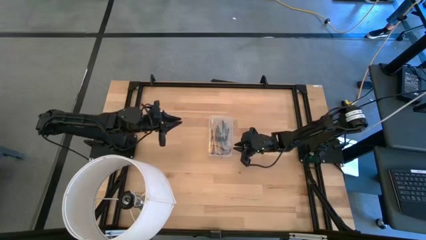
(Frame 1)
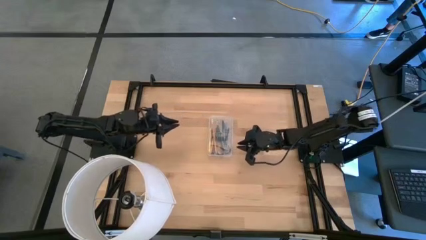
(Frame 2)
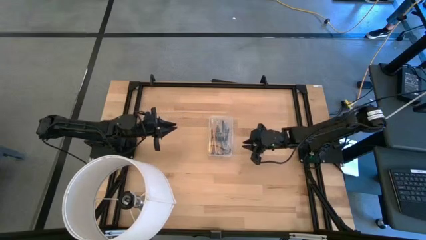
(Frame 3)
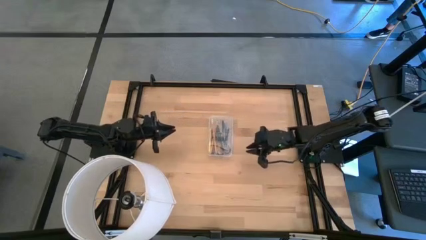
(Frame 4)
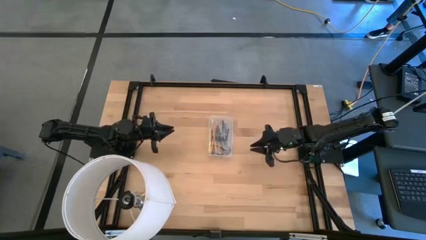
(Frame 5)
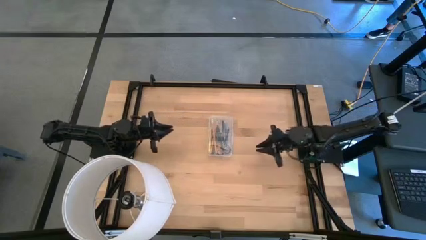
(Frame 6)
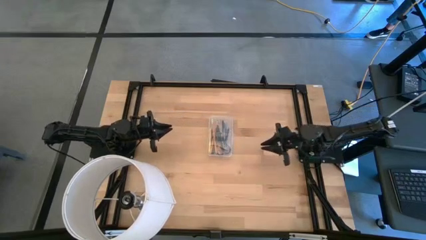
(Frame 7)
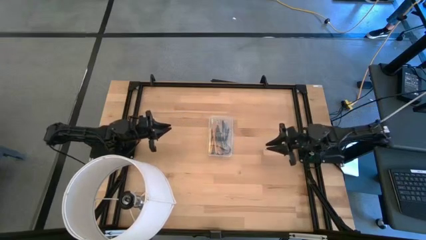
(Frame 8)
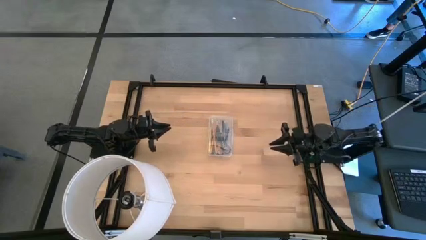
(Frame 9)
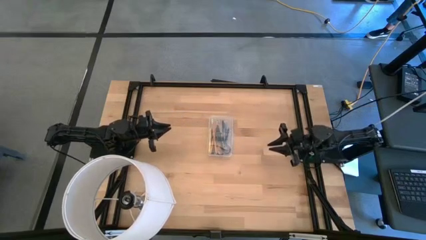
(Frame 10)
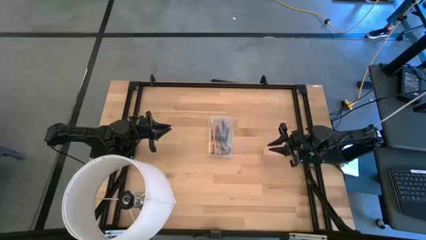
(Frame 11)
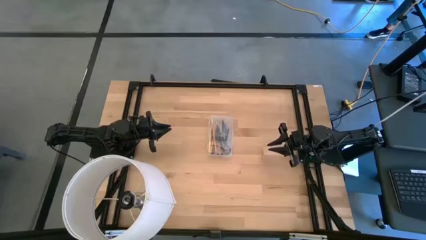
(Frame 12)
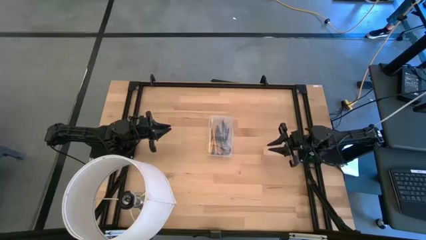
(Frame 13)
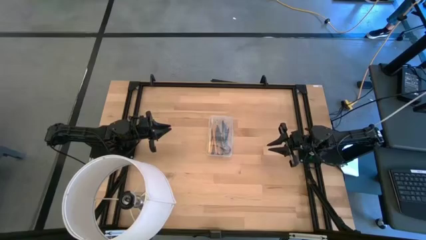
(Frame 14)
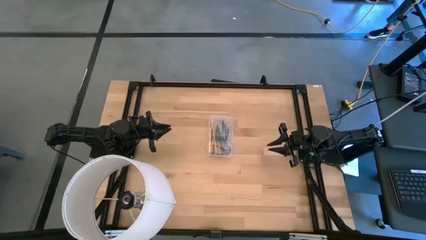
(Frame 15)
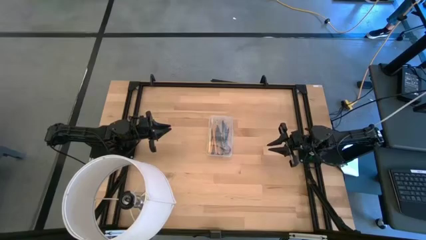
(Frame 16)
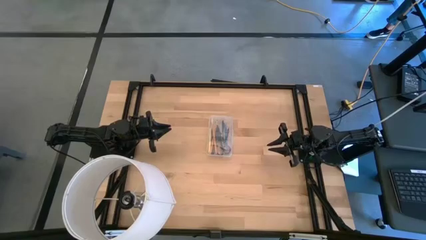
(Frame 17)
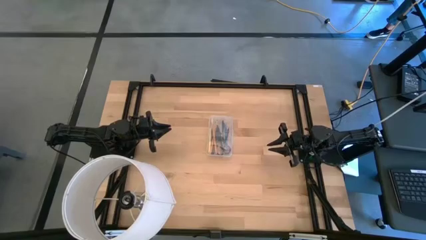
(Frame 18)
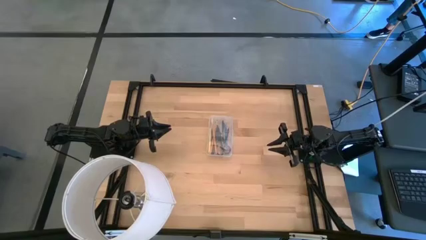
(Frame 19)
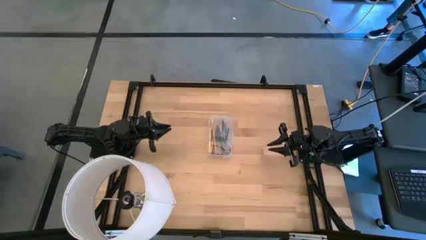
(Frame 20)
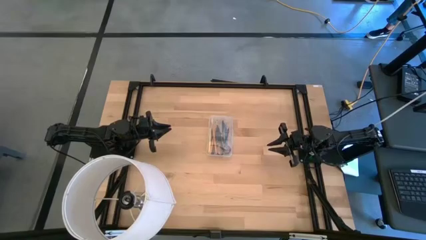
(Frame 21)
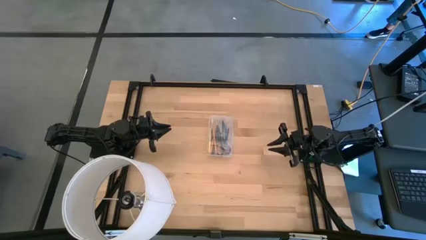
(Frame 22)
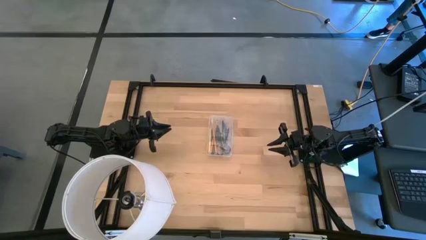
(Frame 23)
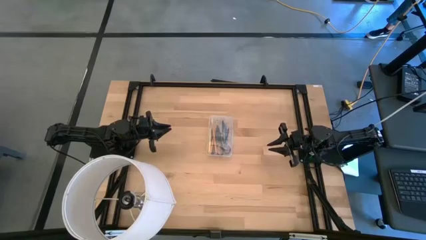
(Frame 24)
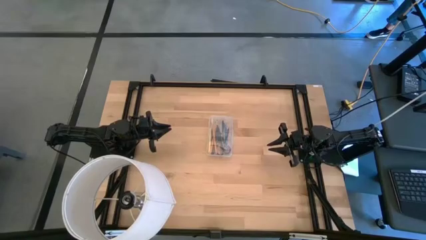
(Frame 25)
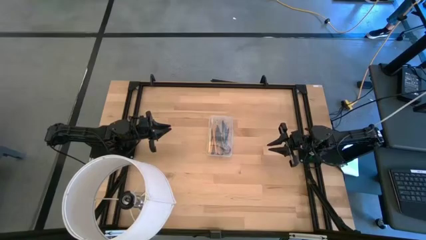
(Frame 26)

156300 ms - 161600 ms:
Task: Pick & place school supplies into a supply box
Return to Home Position

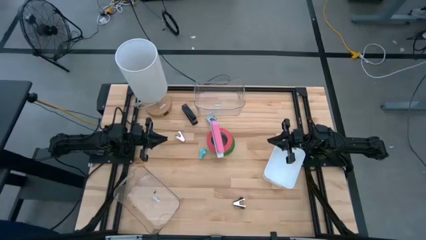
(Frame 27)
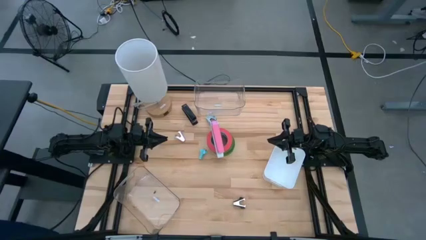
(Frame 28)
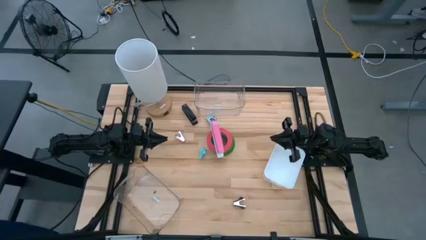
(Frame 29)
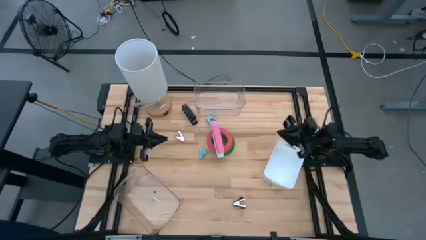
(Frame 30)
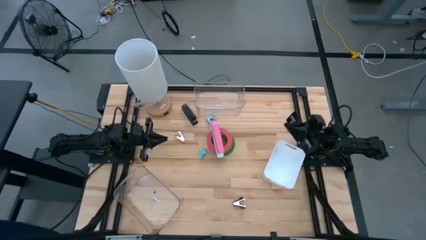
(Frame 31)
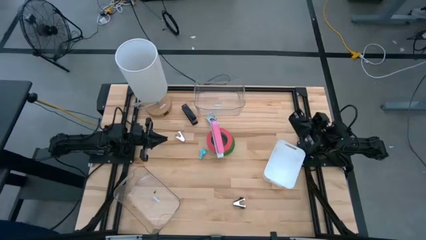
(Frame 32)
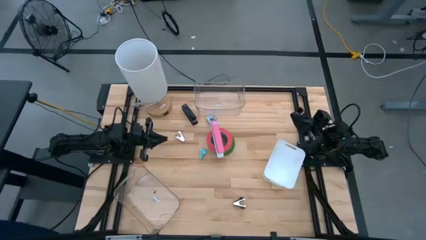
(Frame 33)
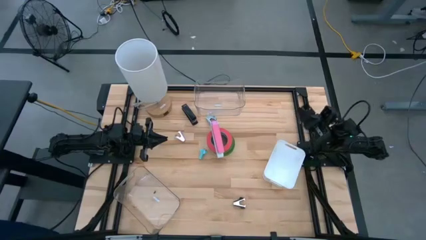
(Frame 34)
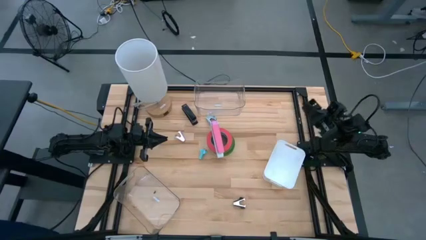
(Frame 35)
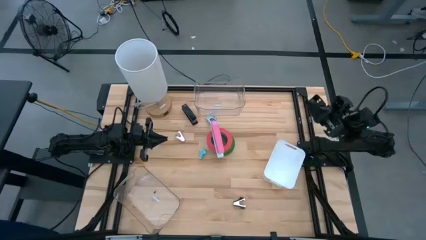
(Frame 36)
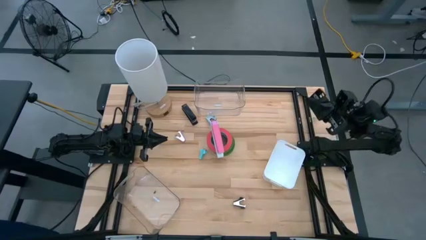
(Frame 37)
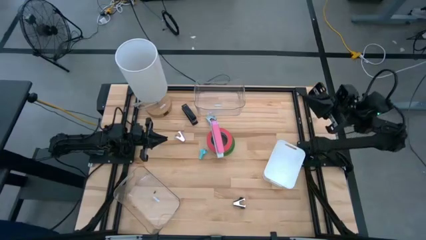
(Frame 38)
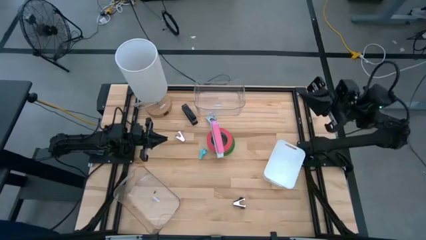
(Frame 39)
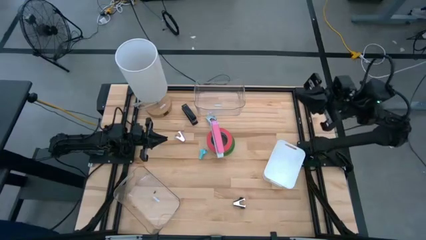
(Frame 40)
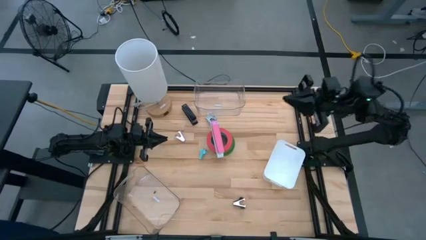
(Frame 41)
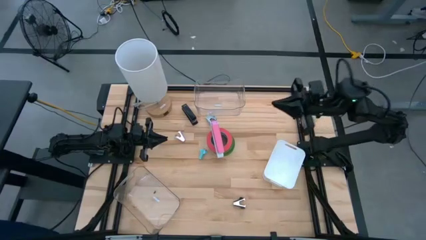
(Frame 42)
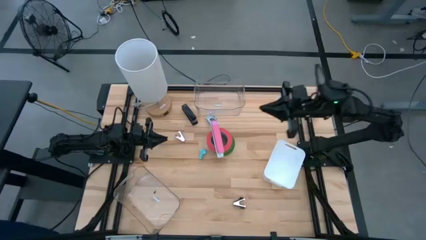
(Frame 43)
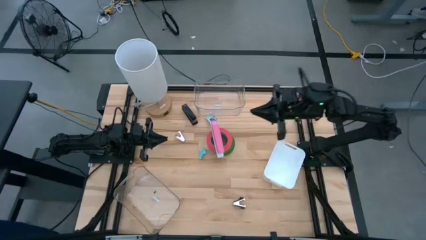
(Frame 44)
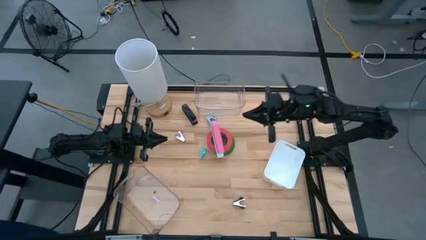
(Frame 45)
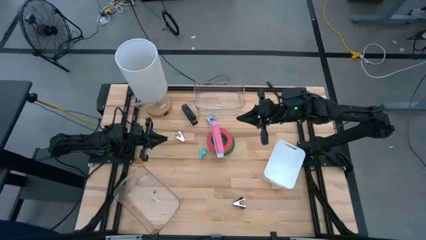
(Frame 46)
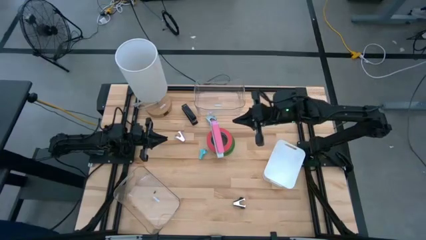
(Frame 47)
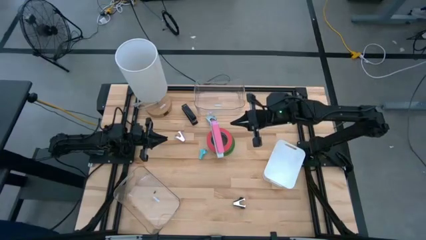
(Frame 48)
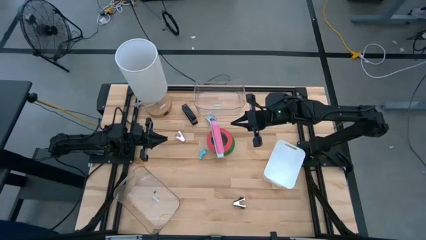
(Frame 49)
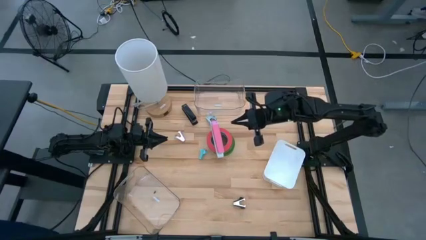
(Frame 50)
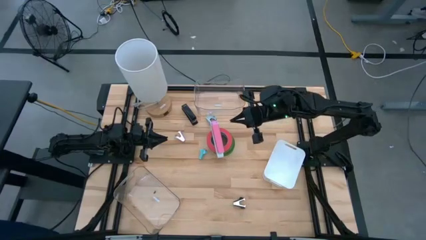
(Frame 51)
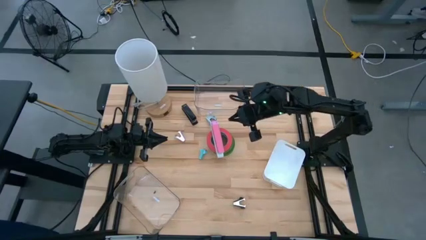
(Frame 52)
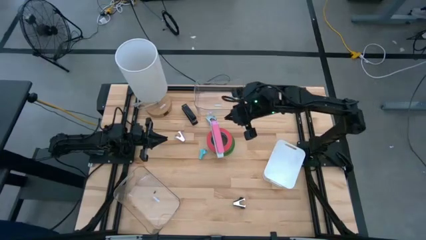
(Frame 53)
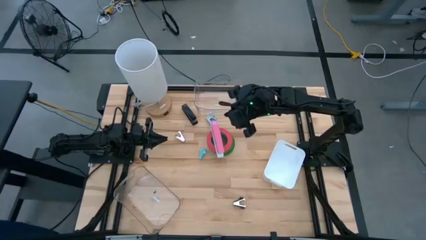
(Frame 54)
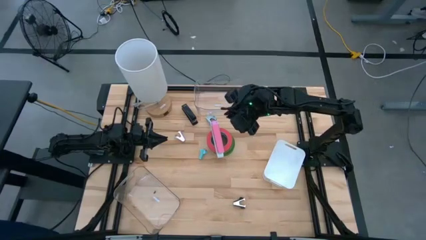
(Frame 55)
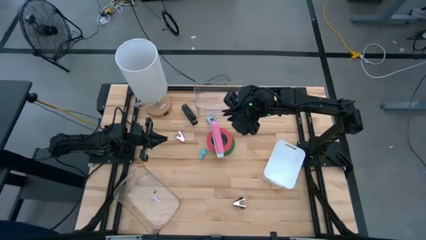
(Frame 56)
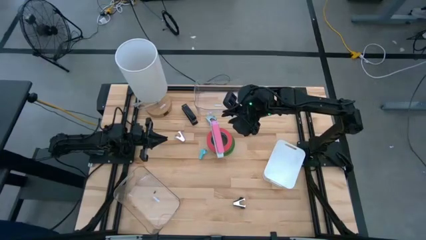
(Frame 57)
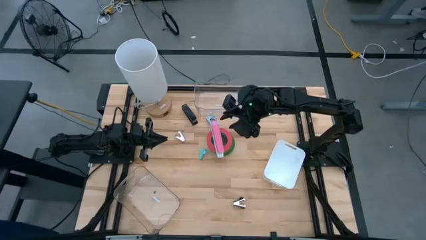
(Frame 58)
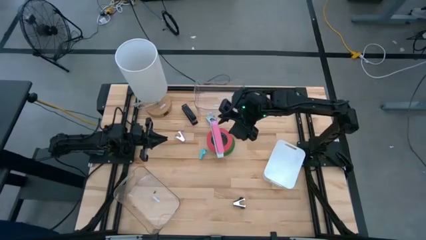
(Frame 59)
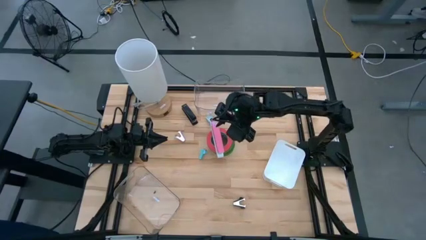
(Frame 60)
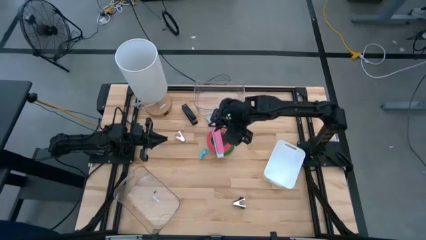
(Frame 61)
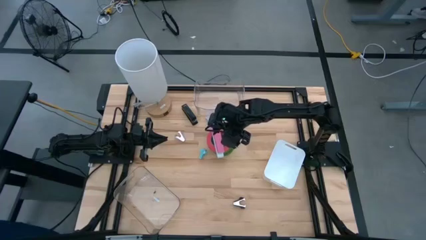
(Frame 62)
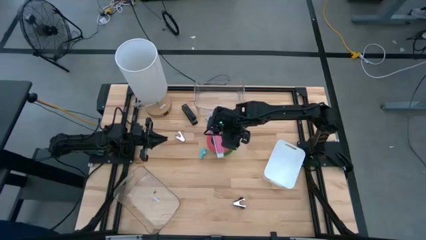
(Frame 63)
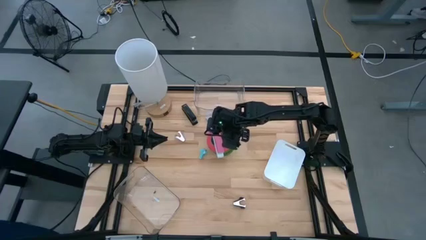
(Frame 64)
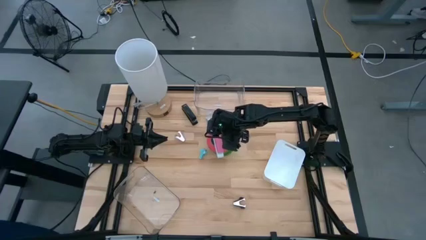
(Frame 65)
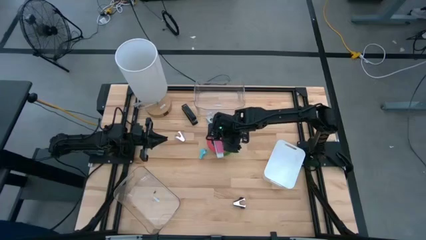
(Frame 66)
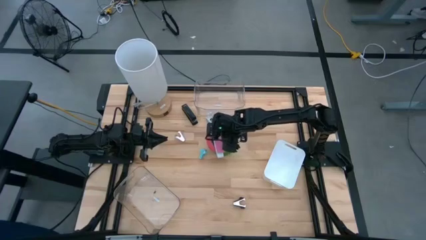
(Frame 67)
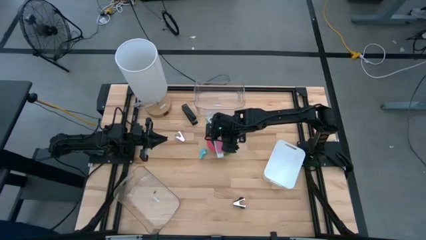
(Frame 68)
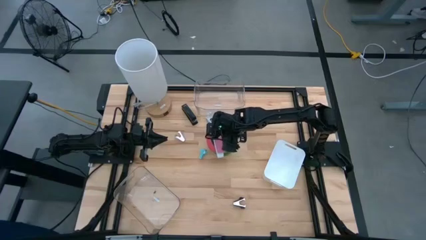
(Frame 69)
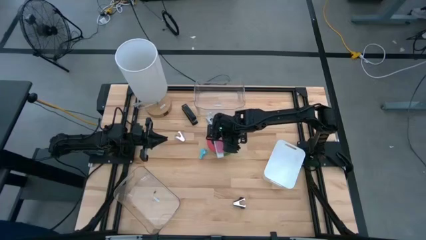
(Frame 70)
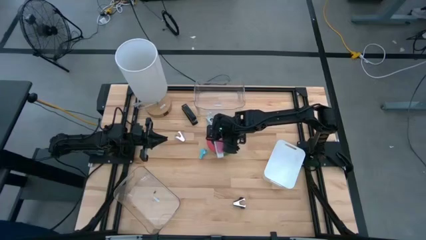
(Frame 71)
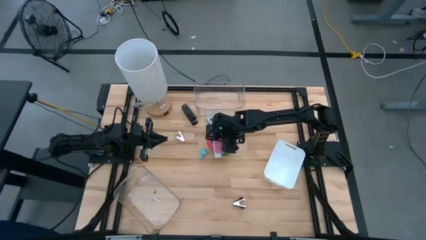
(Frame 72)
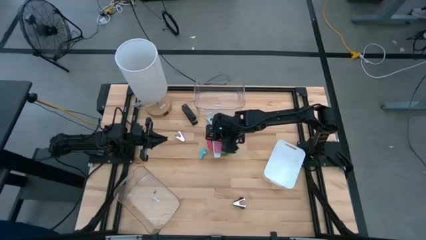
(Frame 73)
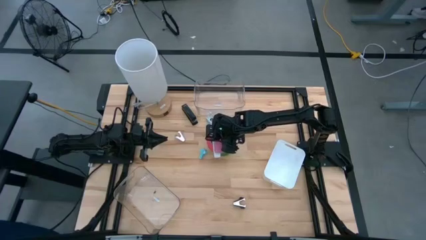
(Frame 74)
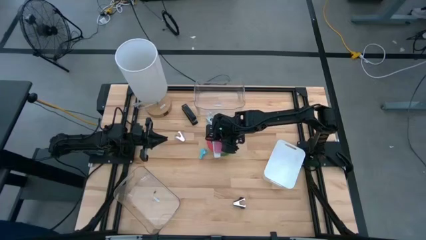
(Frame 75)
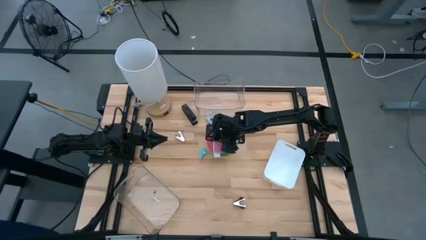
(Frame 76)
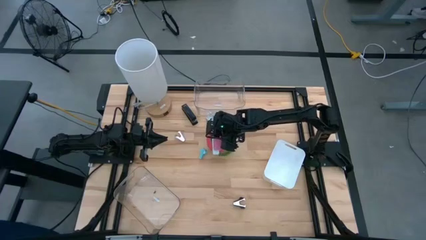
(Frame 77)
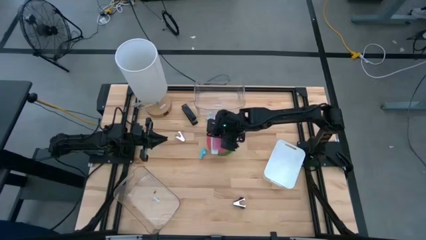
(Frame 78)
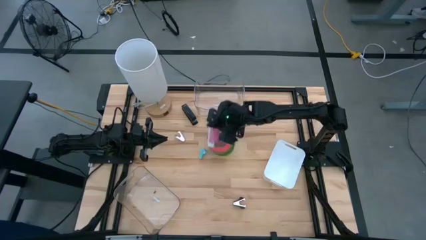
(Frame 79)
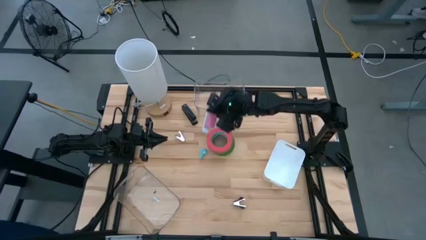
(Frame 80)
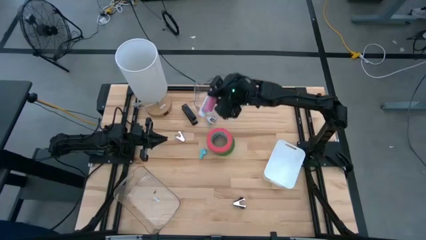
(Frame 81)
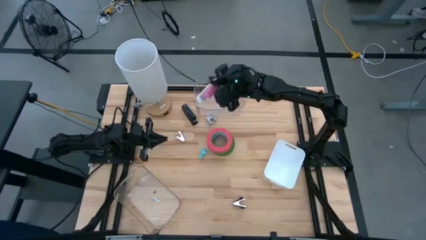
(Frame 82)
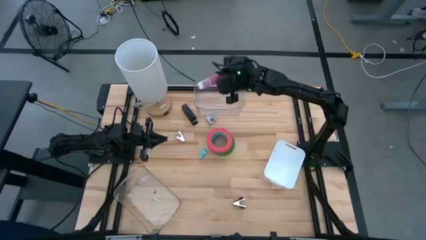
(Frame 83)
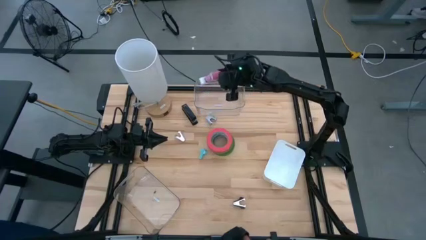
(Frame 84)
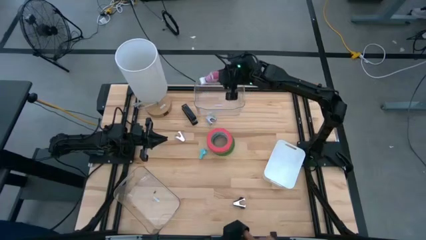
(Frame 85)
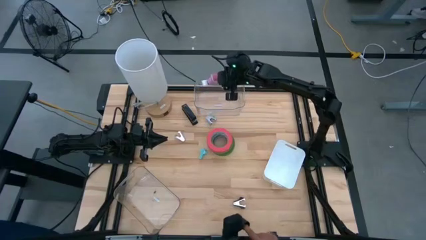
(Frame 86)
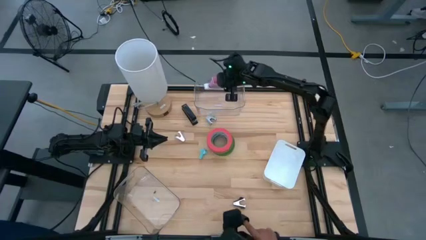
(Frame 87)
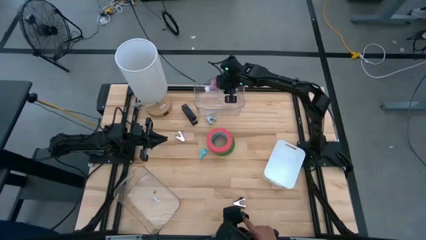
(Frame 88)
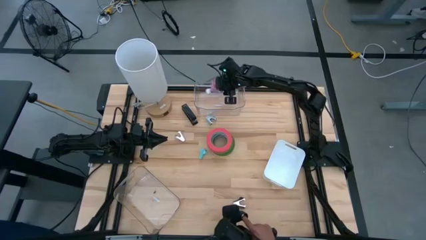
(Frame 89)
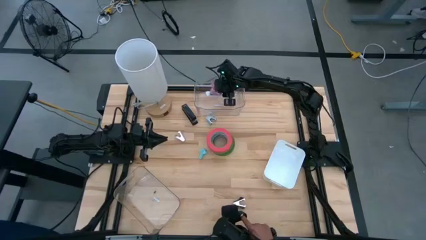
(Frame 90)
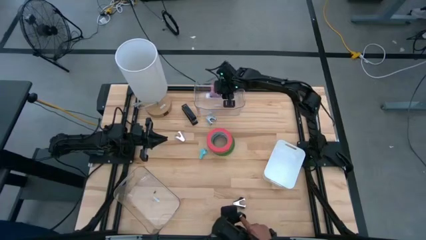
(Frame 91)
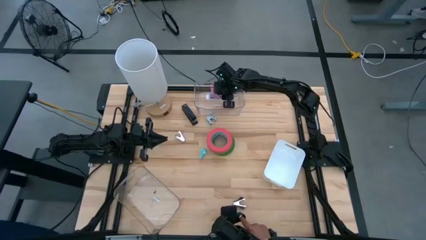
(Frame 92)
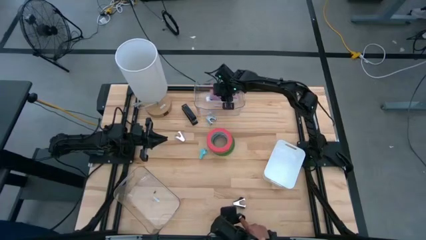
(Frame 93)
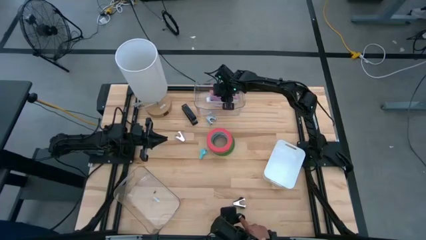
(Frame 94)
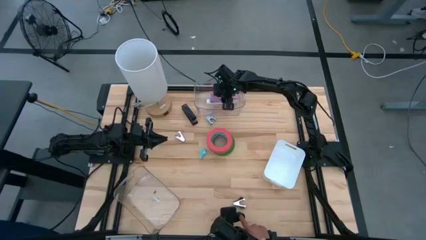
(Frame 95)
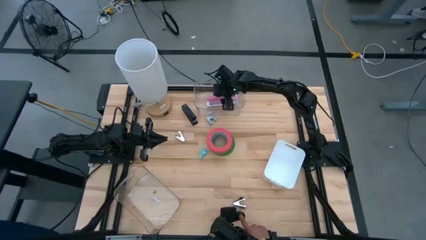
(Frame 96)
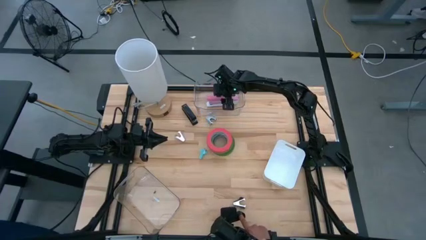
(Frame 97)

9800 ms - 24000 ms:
Task: Pick and place Stapler, Stapler remover, tape
Put the pink stapler into the top transparent bin
